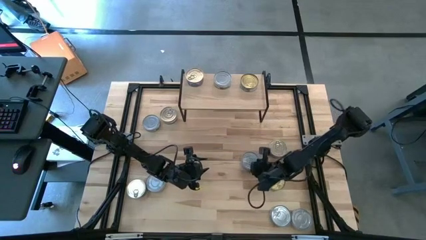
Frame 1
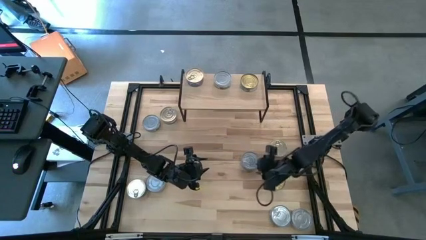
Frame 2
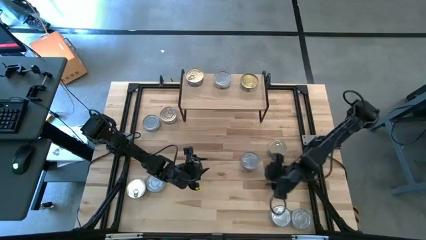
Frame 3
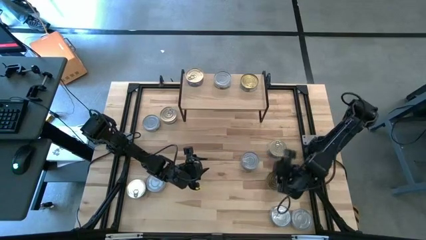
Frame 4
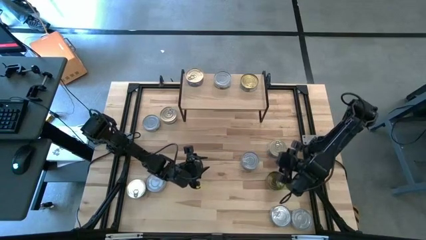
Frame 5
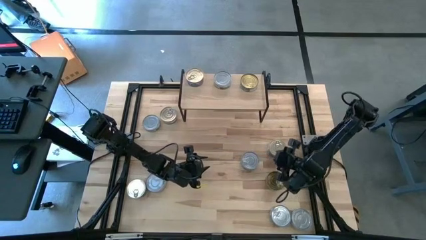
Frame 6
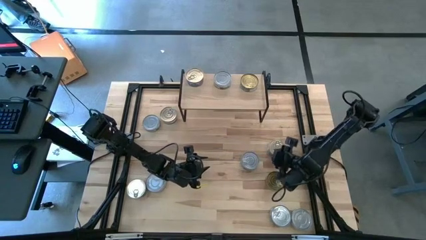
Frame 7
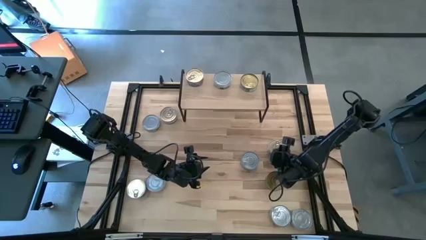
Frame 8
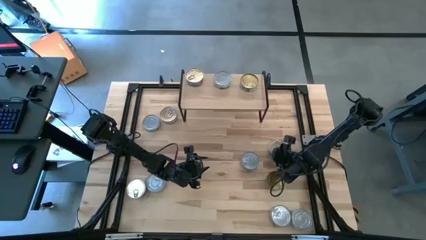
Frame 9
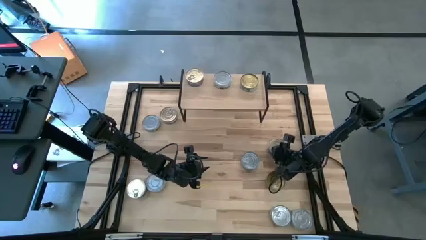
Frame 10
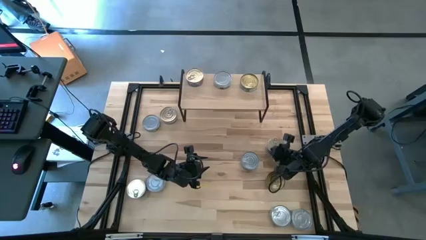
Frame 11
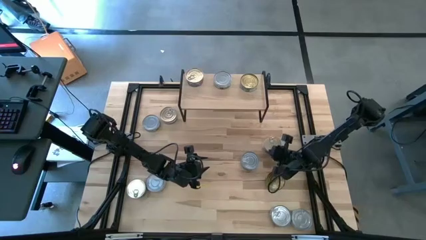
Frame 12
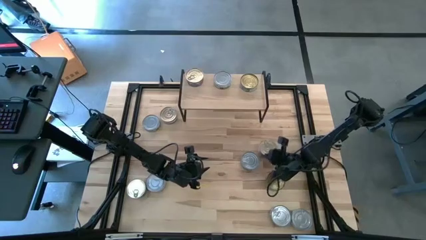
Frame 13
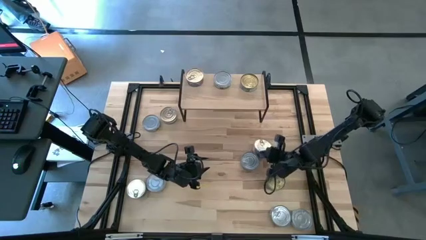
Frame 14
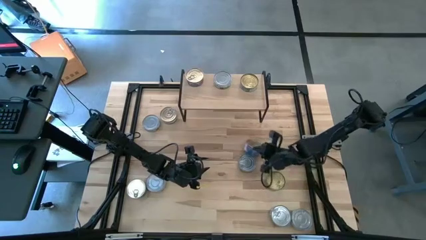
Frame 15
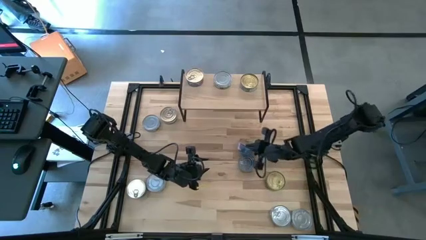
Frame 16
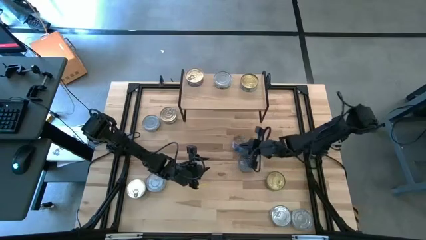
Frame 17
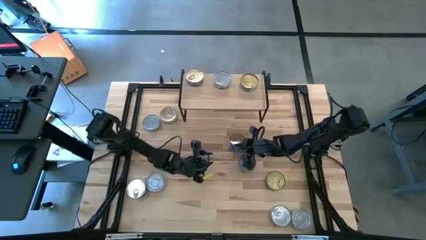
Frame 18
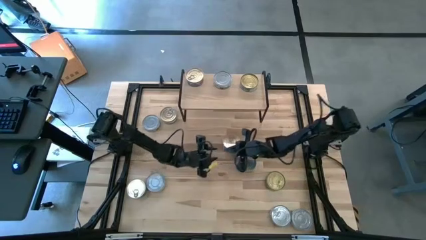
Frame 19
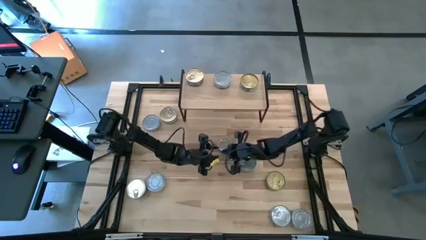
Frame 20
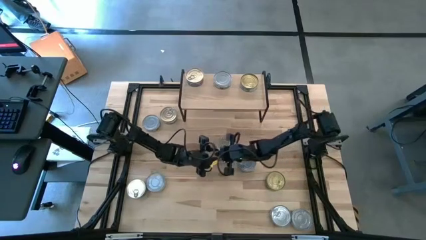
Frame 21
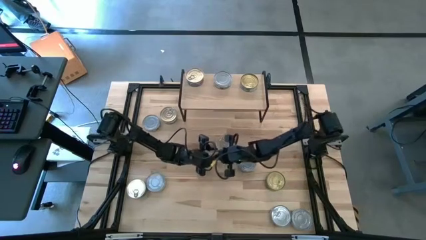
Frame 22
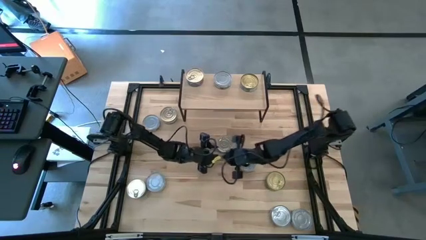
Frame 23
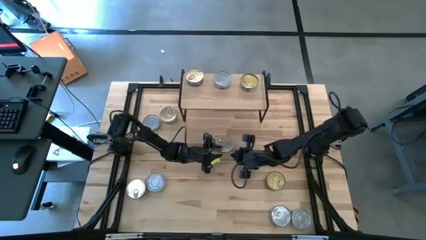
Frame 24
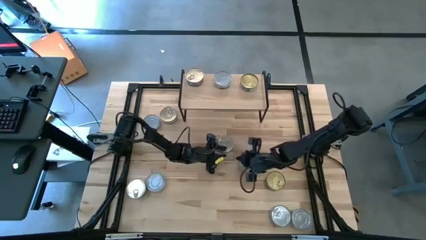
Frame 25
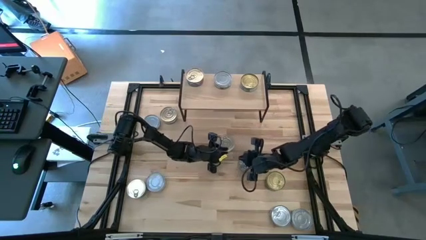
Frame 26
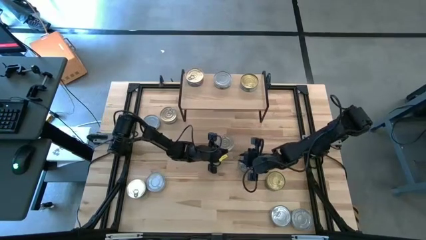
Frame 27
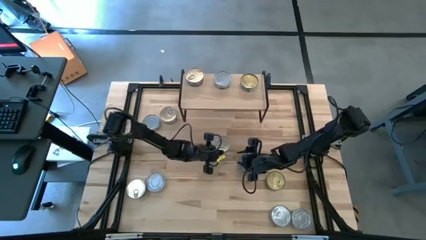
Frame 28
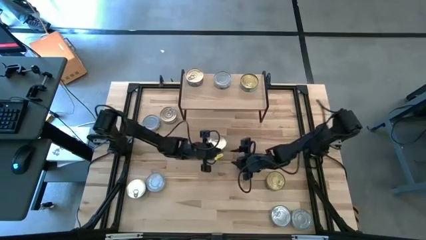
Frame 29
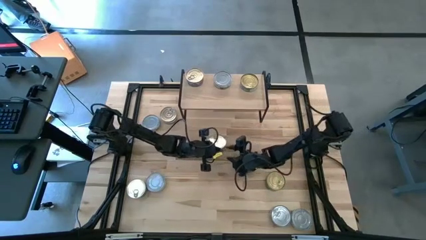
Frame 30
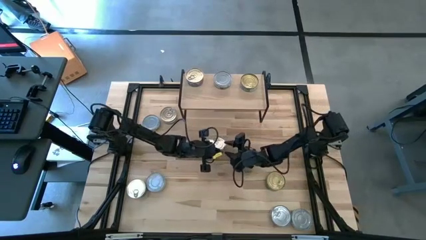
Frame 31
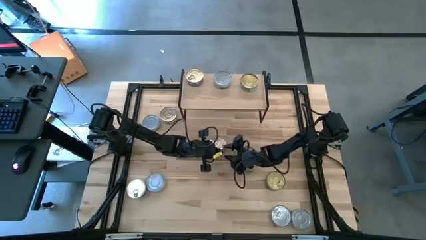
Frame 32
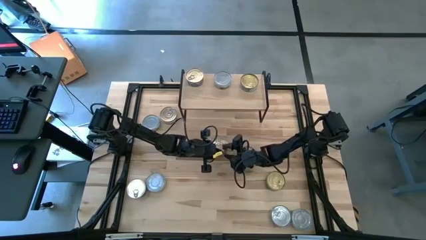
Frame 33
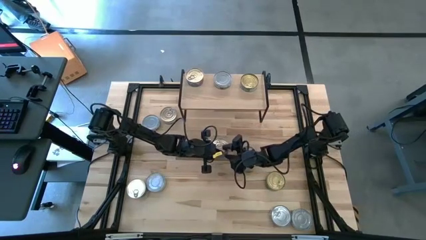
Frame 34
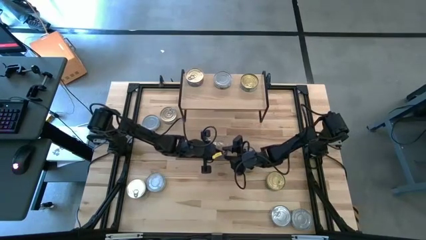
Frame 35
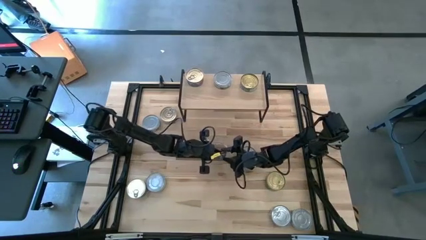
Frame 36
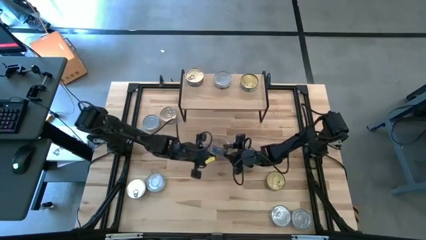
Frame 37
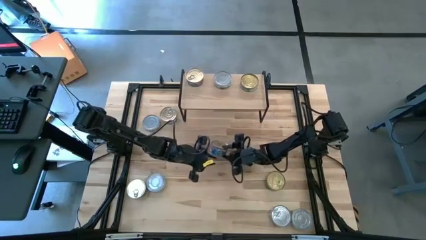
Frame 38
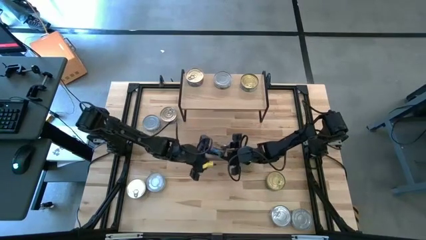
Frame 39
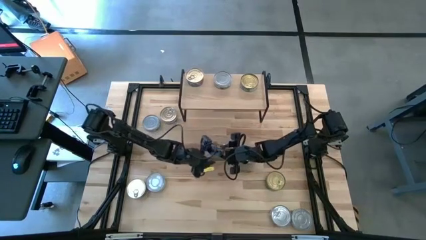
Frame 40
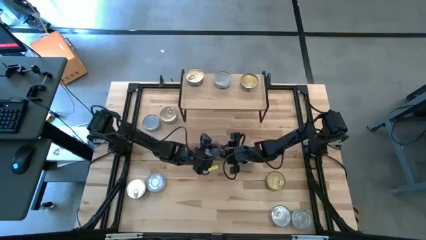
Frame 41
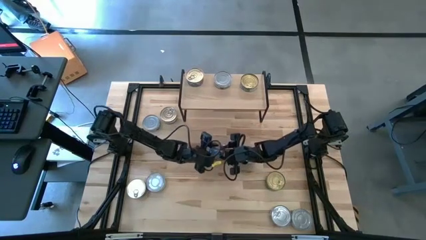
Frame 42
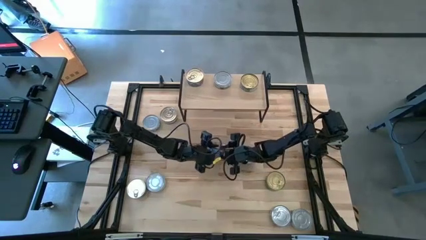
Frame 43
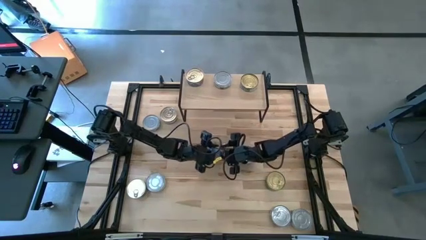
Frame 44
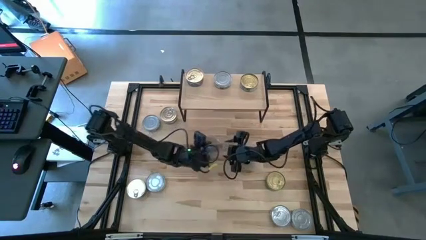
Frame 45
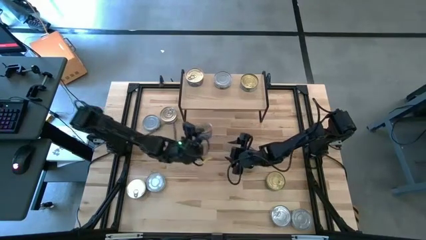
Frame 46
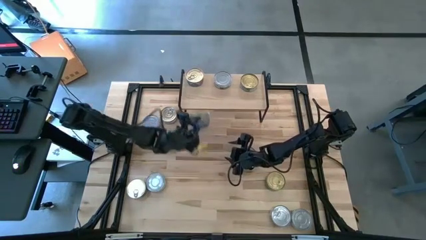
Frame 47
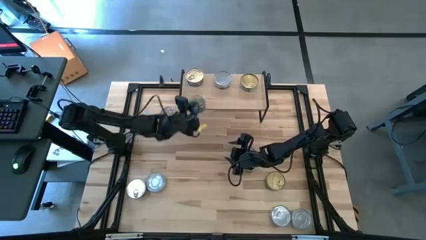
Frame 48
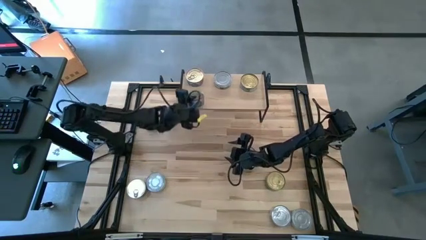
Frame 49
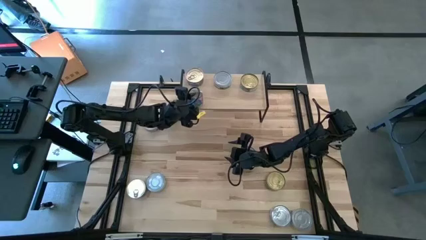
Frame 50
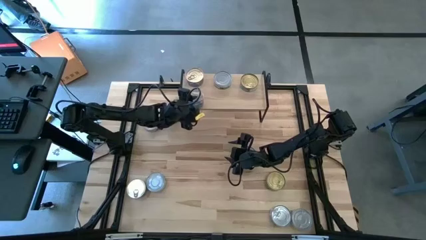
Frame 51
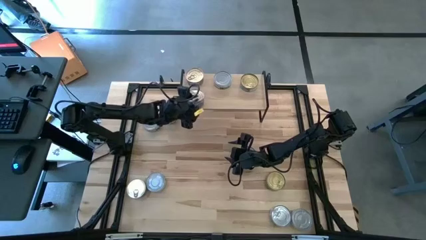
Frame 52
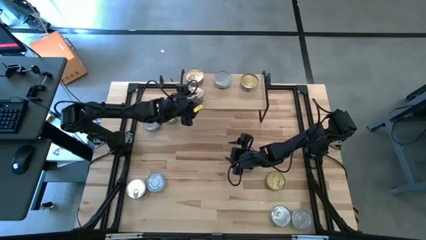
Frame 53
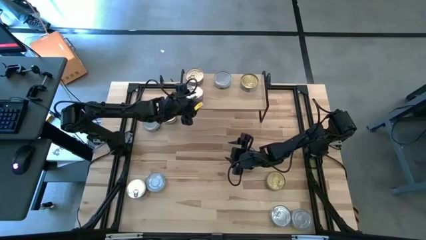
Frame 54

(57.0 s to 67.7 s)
Task: Stack canned seafood by type on shelf
Put the blue tuna can on the shelf

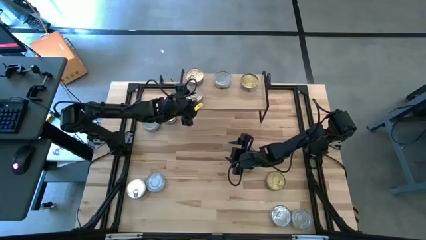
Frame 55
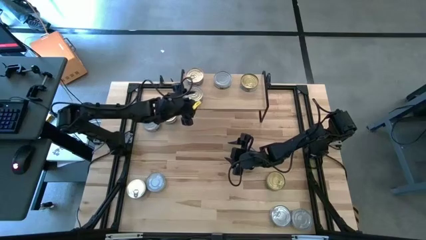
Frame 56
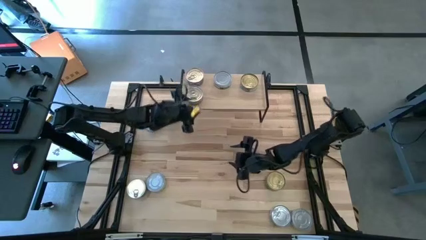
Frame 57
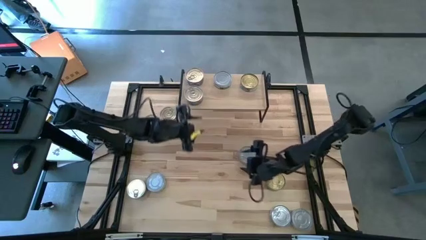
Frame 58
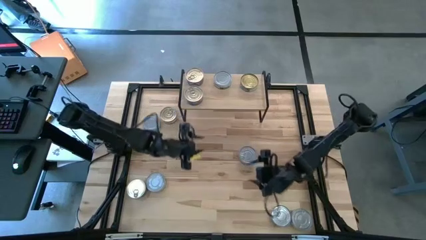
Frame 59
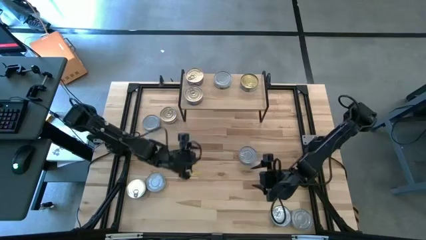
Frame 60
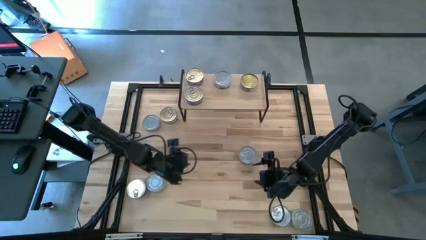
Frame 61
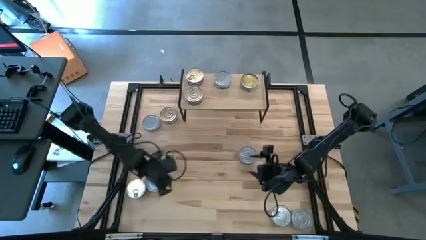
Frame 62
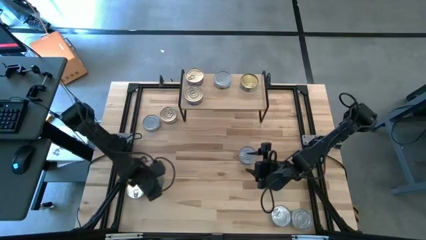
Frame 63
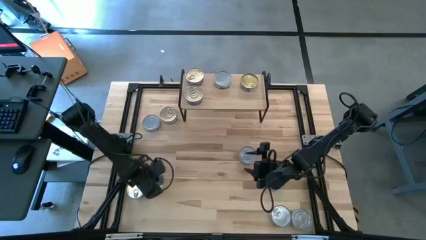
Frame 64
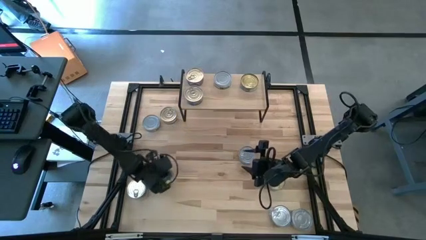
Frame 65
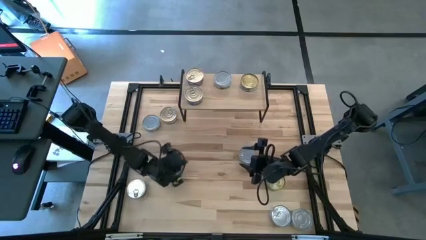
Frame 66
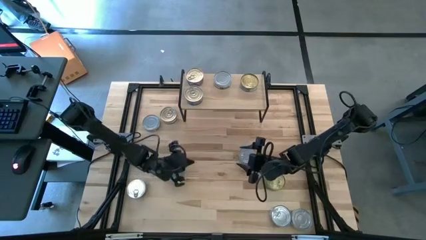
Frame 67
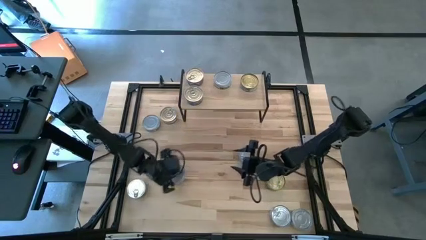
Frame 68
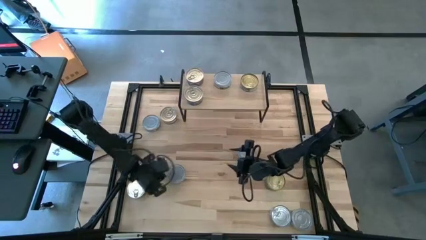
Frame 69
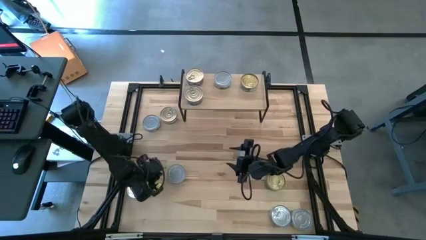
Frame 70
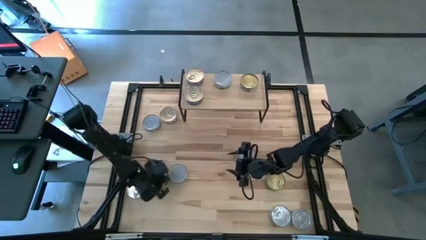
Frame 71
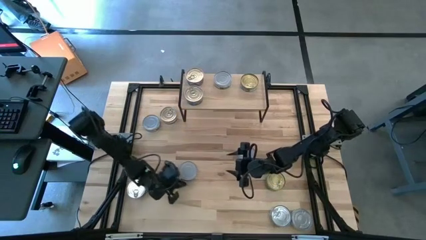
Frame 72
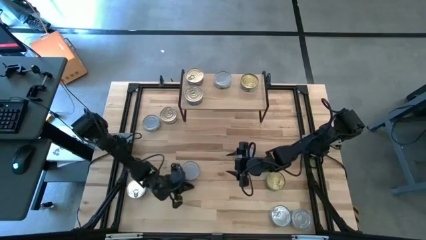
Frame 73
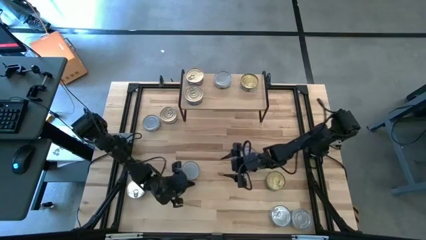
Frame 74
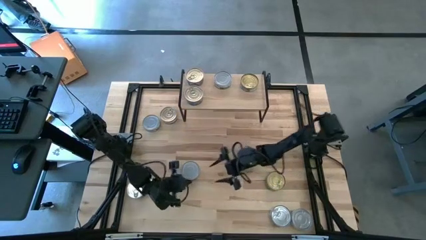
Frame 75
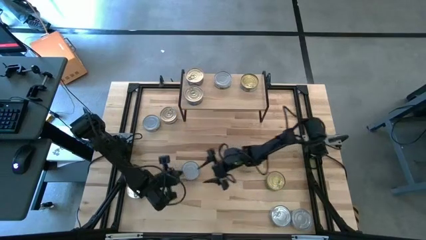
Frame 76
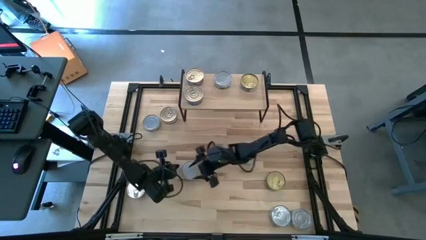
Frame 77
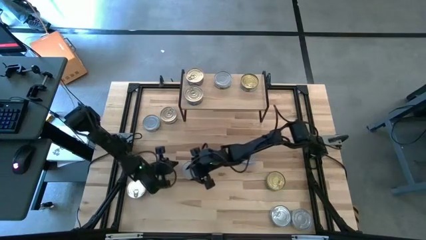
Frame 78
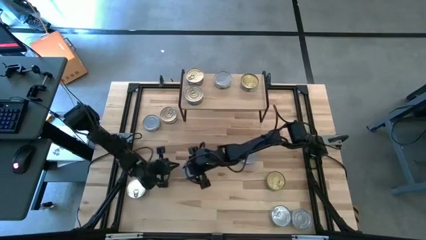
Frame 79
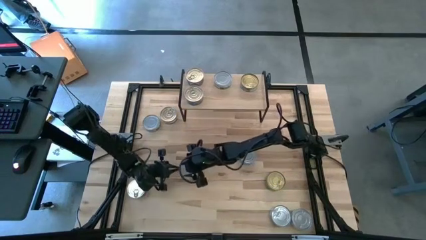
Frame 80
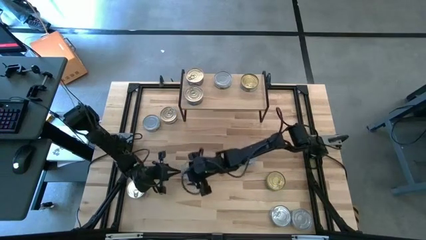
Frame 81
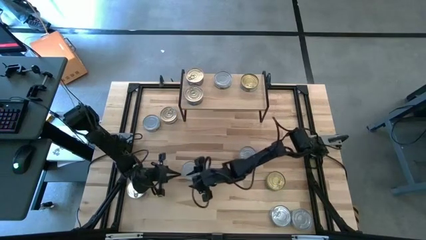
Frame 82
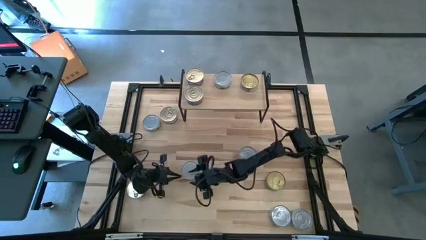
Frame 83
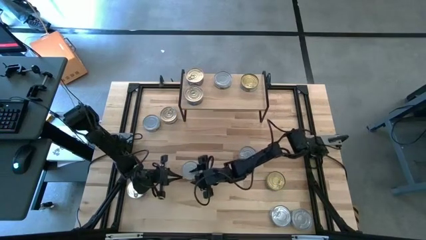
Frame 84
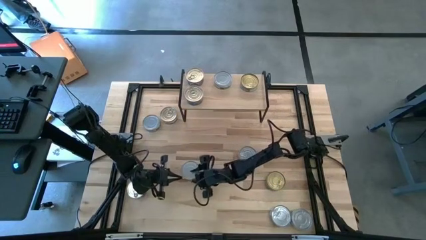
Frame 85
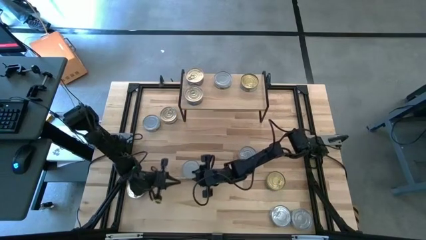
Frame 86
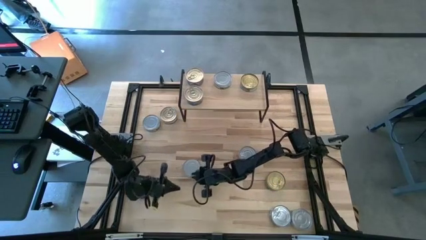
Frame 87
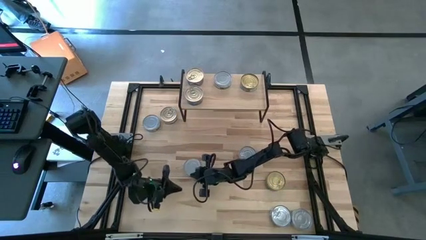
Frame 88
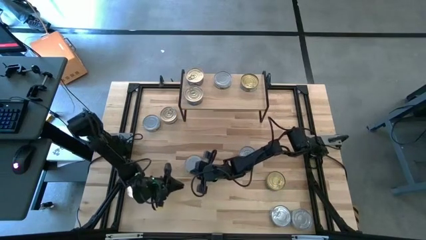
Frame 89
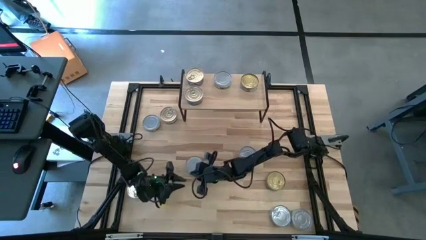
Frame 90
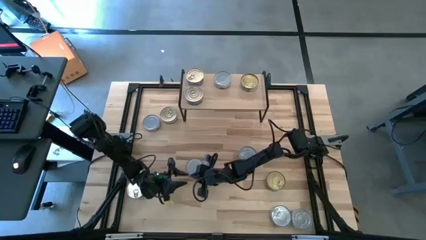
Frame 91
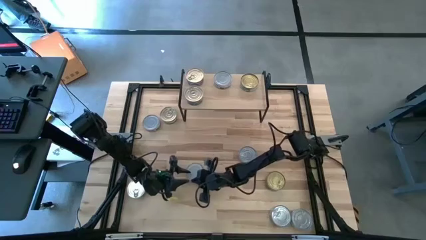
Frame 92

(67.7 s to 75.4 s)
Put the green tuna can on the shelf
